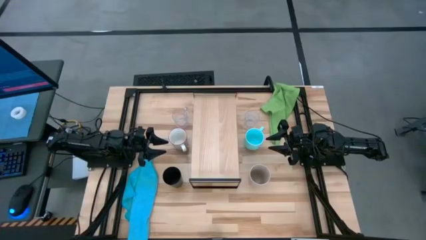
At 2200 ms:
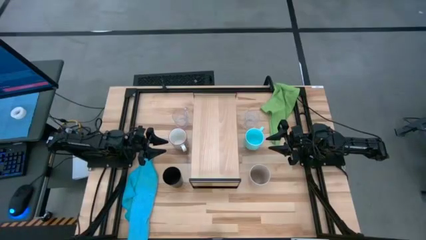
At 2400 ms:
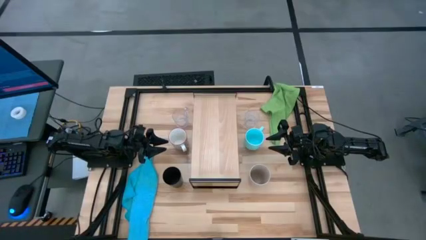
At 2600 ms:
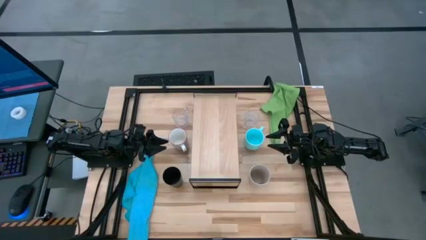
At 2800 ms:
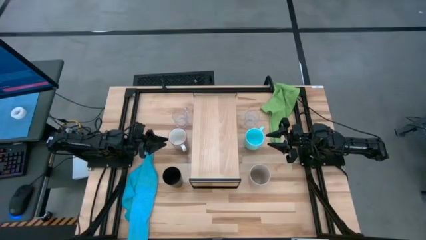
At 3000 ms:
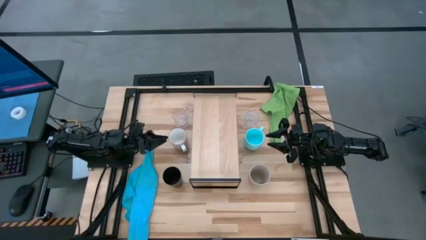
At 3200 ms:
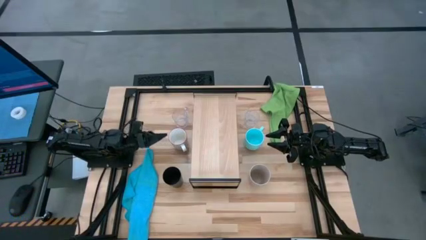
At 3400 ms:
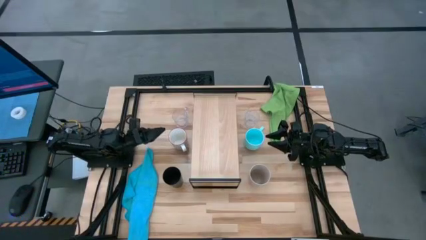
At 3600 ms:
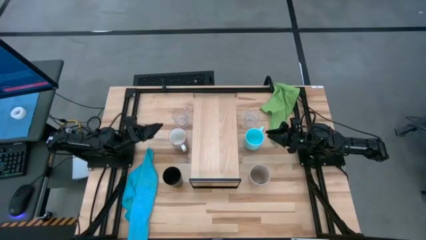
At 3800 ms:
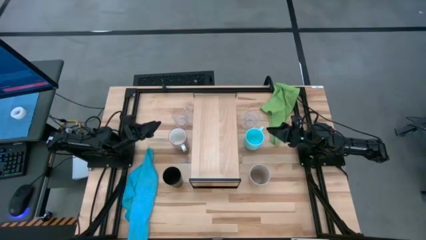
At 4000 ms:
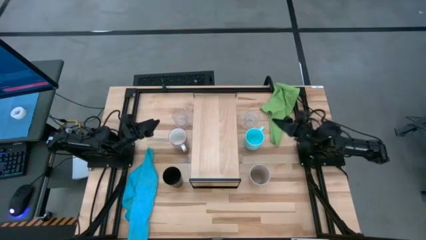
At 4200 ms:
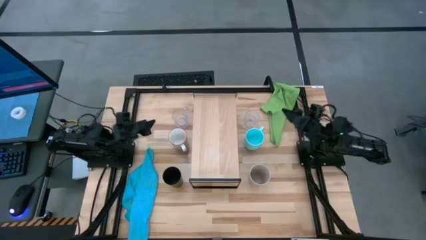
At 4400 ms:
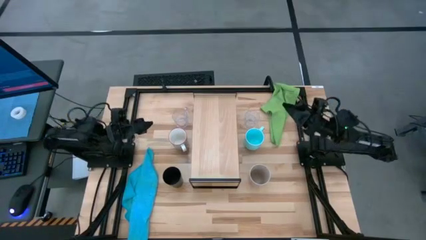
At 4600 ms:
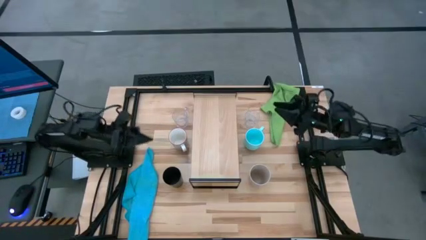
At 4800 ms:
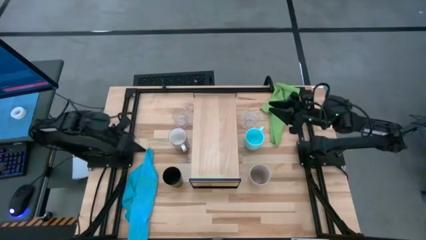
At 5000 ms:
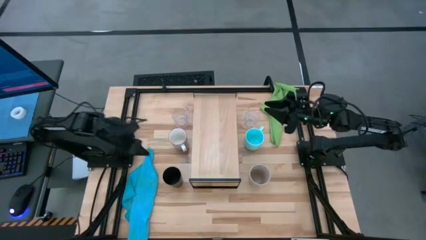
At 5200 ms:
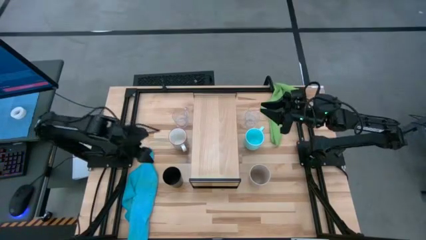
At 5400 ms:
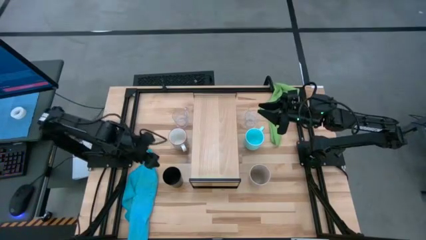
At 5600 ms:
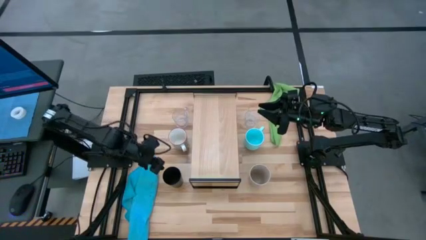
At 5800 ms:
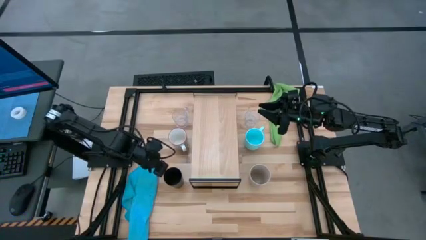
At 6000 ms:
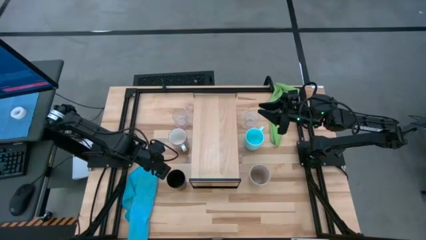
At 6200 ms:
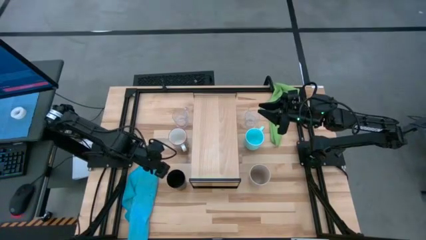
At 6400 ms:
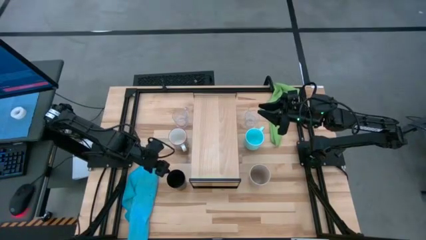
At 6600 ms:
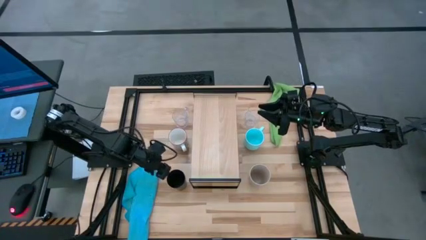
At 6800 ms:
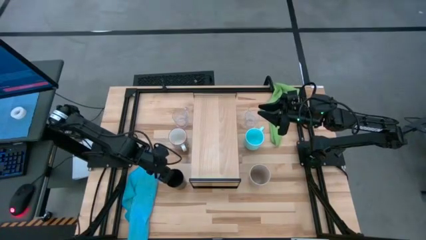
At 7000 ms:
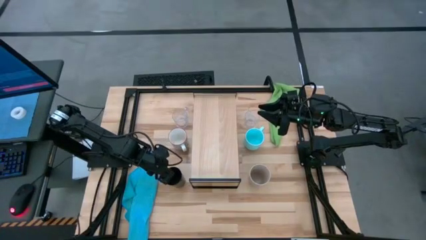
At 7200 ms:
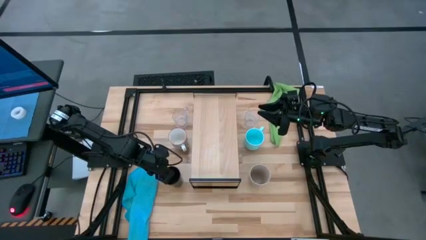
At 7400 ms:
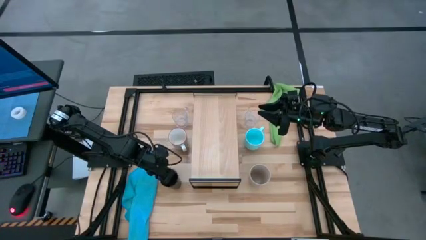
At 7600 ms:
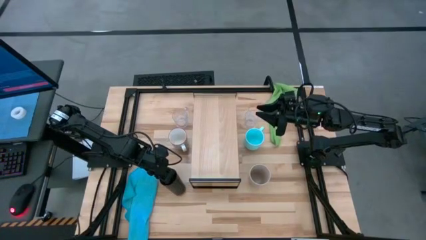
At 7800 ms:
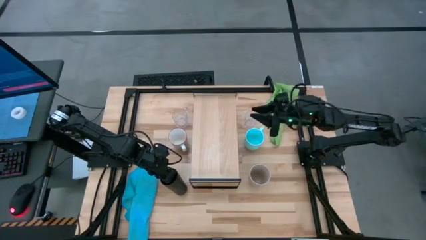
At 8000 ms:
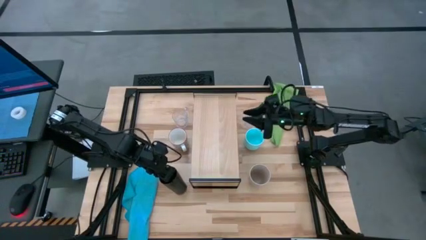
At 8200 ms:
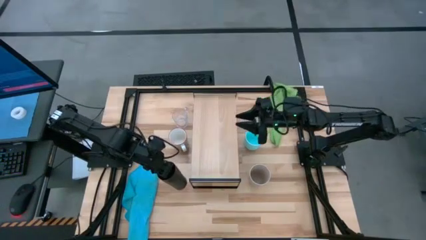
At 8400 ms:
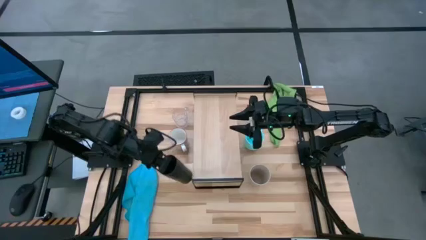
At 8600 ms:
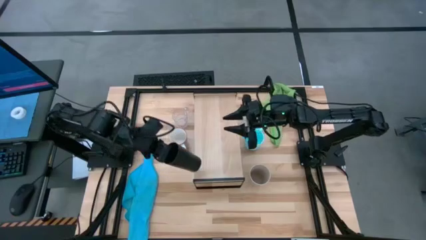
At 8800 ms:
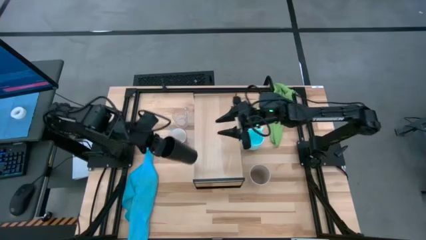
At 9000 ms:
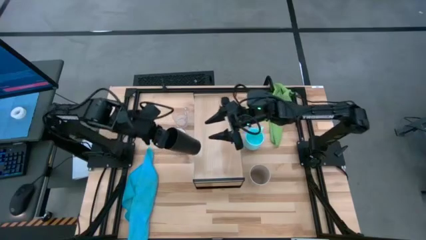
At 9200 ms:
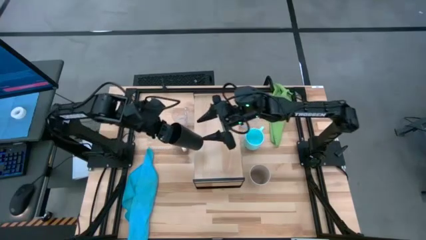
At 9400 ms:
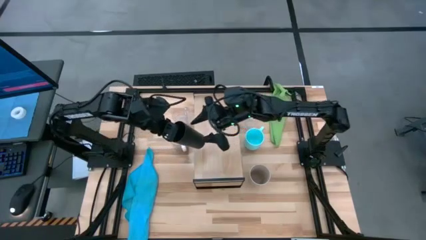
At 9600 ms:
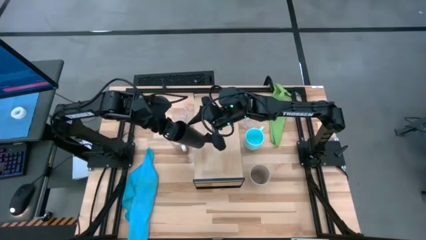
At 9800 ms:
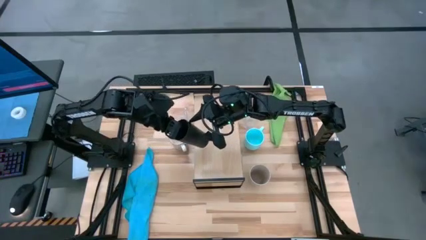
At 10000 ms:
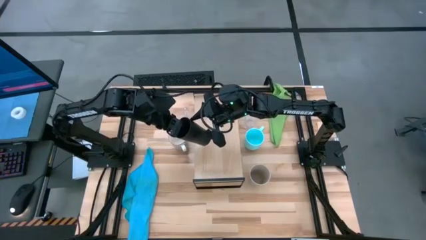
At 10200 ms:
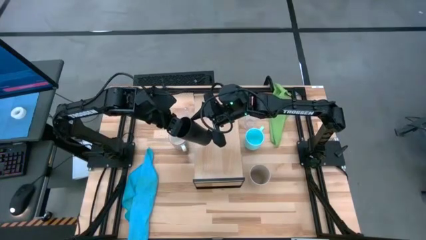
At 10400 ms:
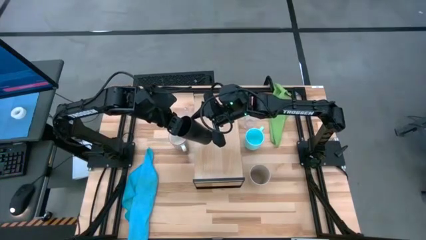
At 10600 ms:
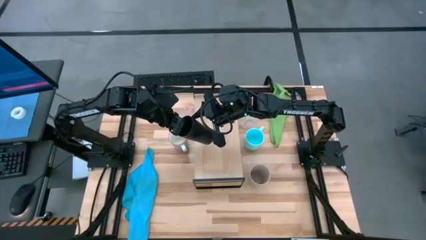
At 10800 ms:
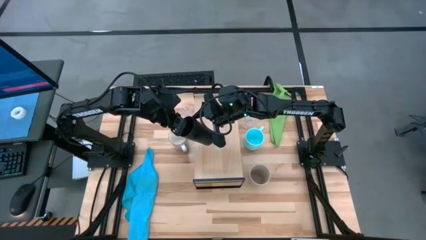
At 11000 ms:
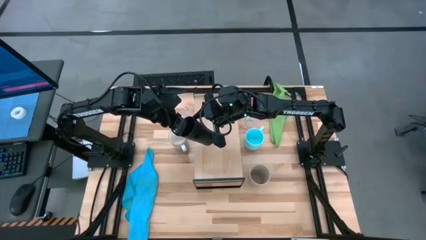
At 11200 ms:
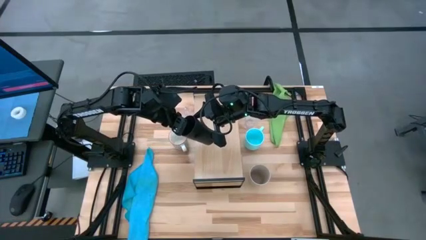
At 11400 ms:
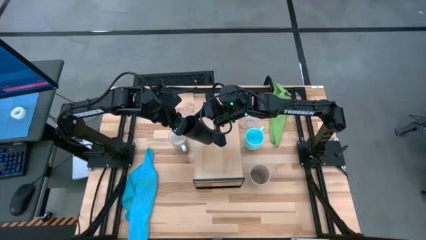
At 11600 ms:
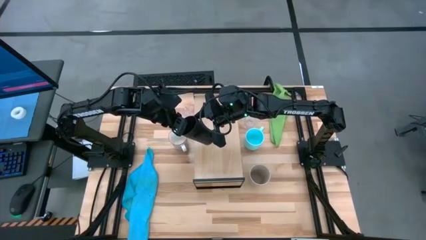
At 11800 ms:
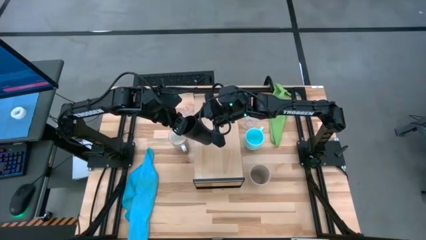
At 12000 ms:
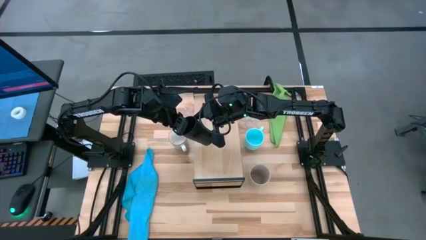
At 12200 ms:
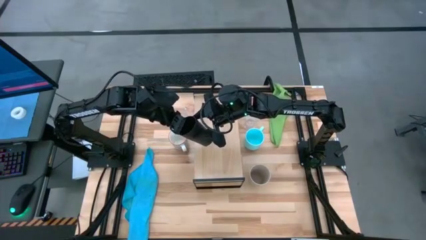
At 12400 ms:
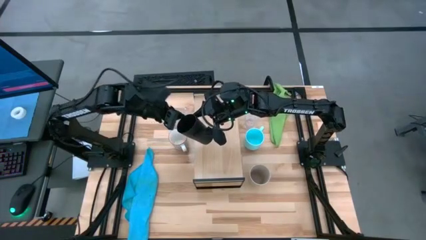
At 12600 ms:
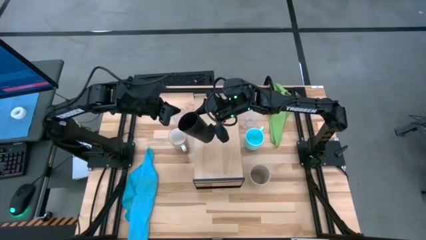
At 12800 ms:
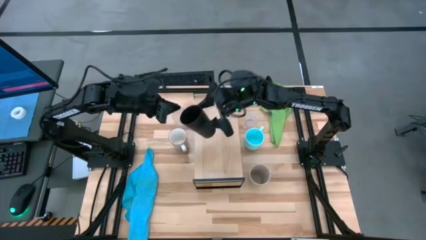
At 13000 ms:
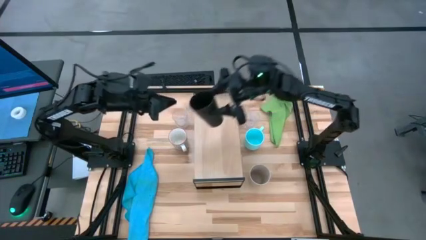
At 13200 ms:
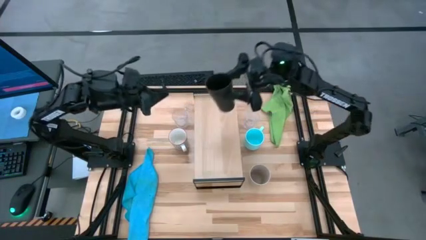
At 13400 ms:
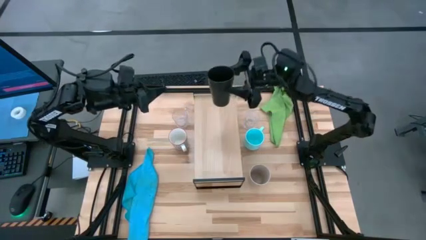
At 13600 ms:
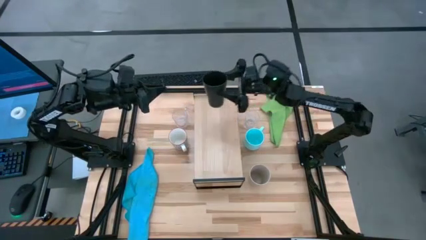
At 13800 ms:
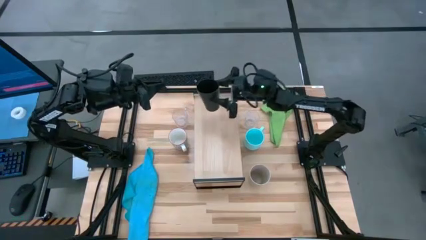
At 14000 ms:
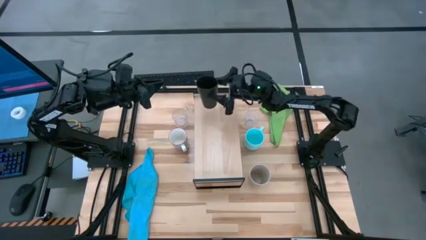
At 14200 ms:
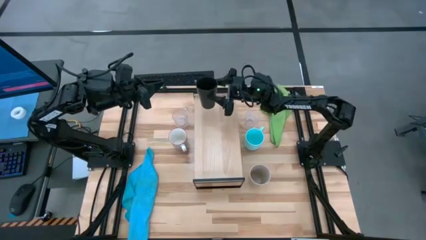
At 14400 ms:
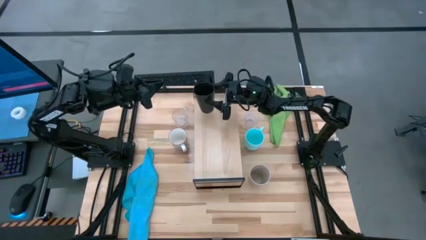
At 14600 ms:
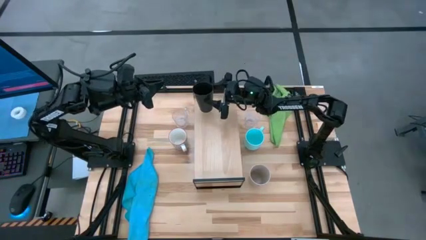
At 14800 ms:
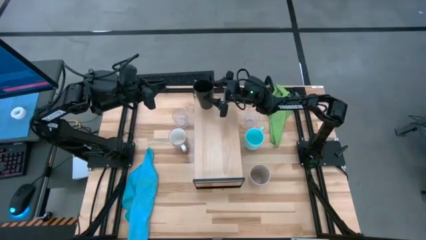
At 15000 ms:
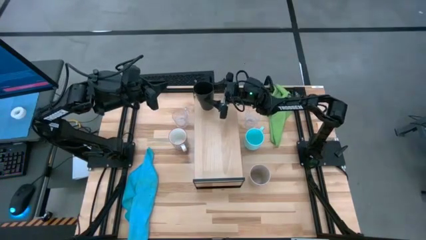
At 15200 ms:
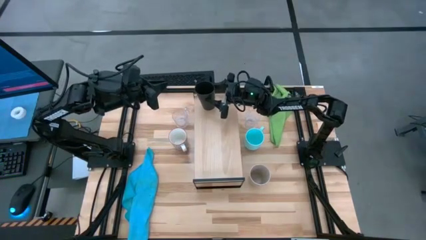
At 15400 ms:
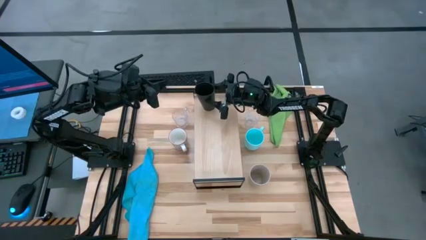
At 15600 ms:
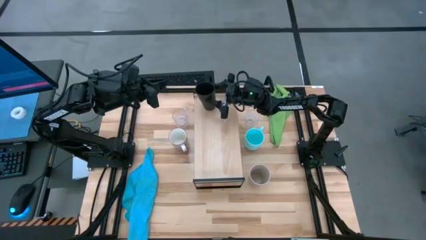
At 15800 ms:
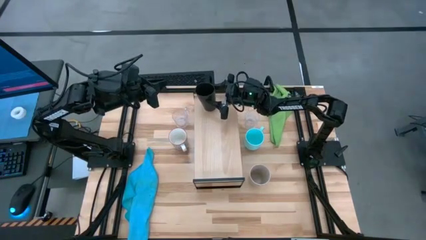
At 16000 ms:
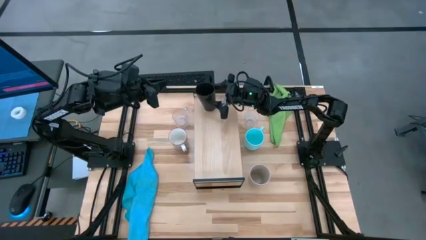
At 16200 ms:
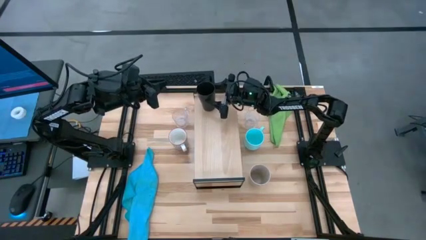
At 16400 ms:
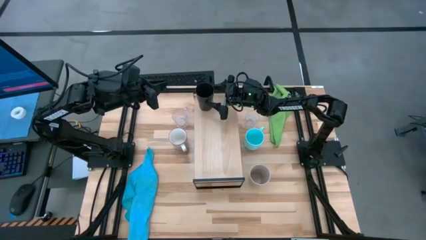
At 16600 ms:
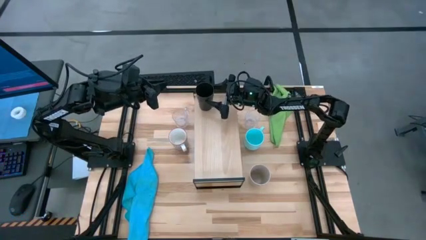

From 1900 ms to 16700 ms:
Task: Stack small to large cups/mugs on shelf
Put the black cup on the shelf
